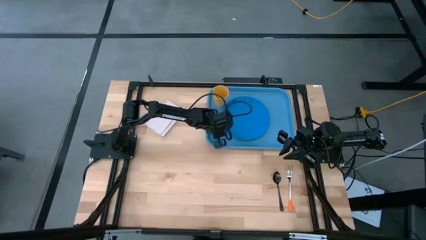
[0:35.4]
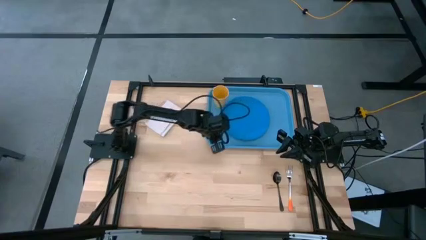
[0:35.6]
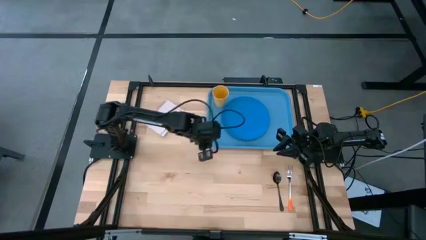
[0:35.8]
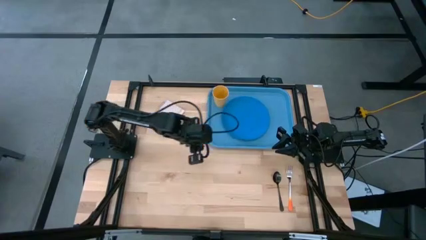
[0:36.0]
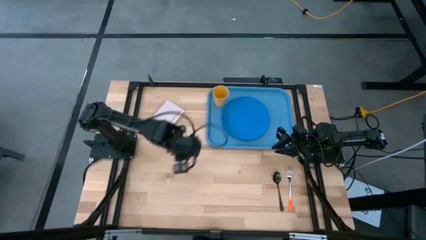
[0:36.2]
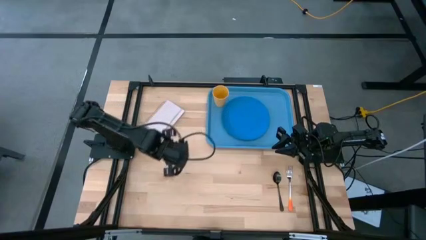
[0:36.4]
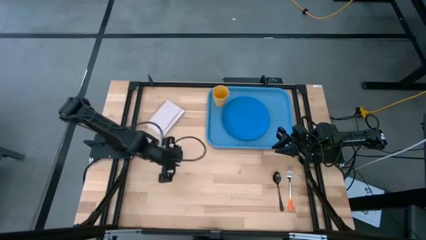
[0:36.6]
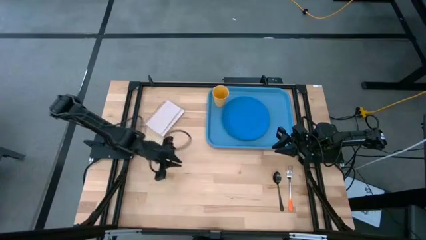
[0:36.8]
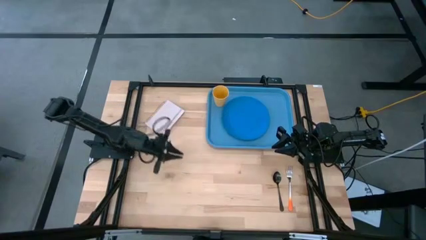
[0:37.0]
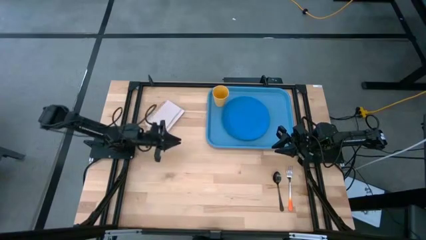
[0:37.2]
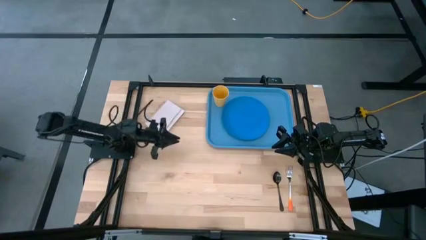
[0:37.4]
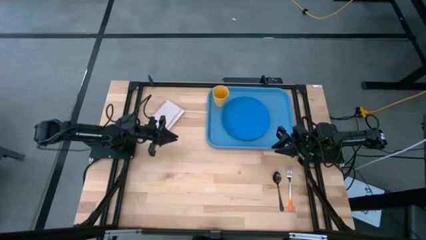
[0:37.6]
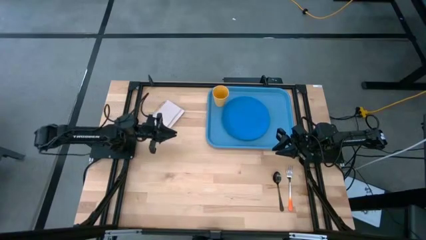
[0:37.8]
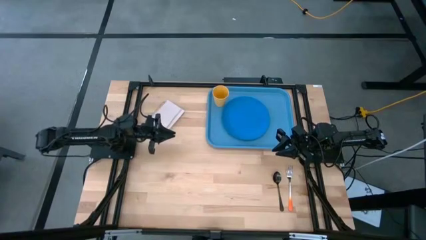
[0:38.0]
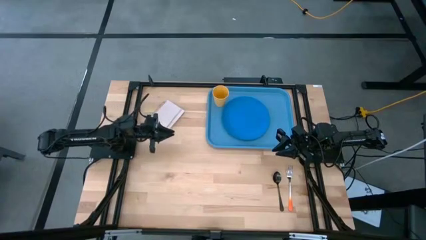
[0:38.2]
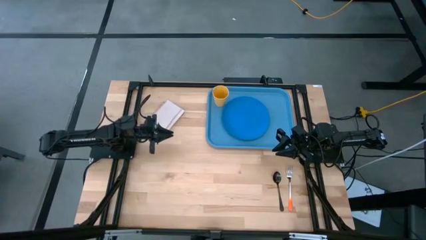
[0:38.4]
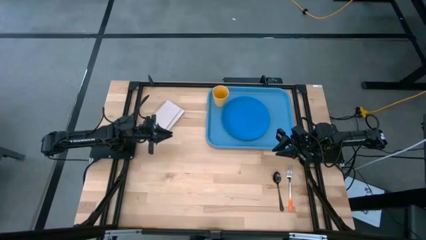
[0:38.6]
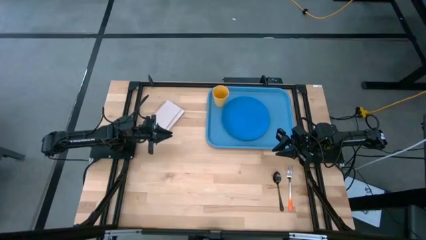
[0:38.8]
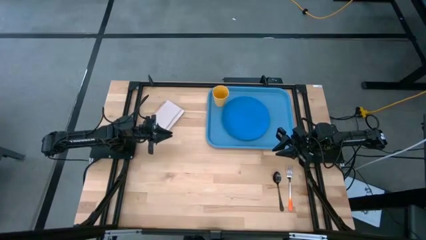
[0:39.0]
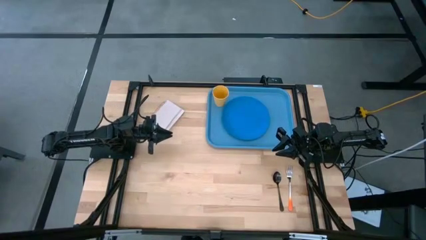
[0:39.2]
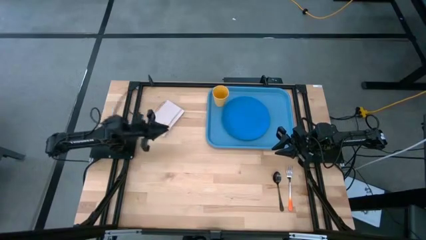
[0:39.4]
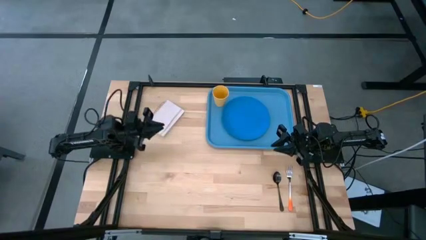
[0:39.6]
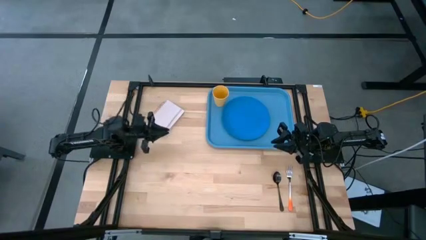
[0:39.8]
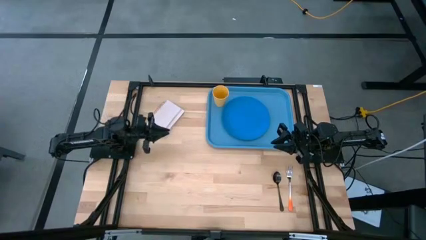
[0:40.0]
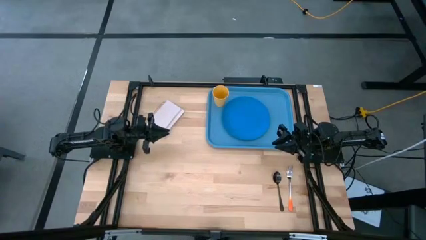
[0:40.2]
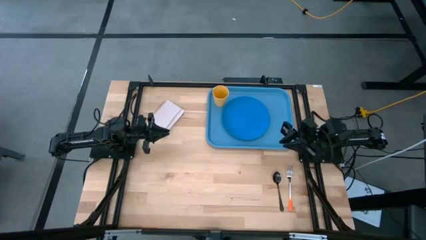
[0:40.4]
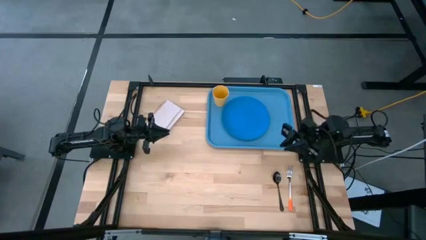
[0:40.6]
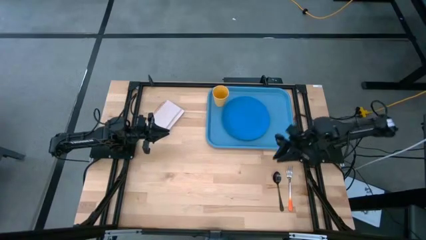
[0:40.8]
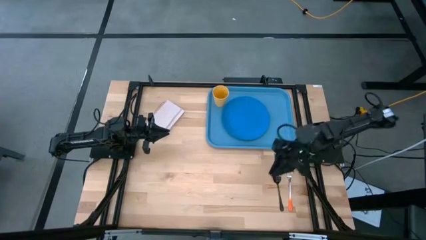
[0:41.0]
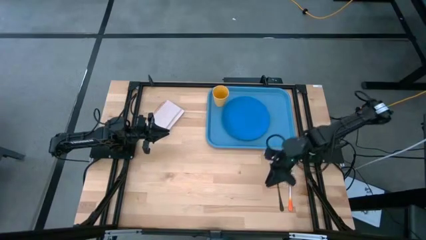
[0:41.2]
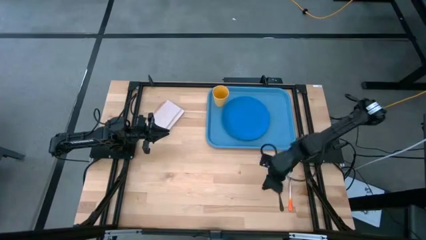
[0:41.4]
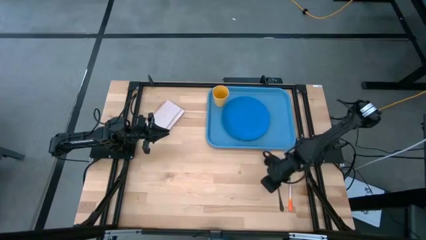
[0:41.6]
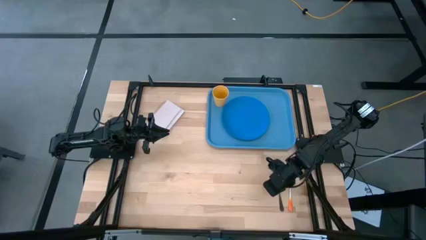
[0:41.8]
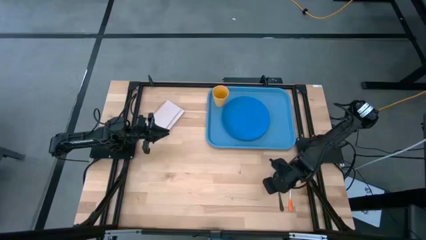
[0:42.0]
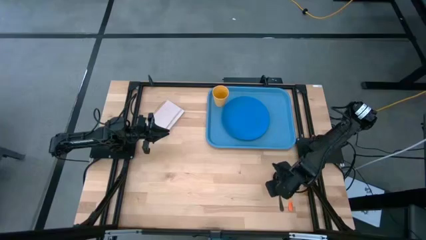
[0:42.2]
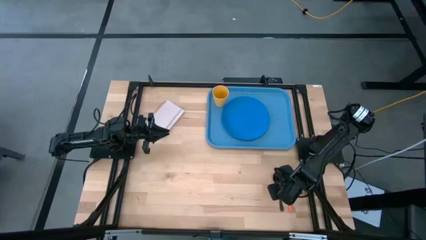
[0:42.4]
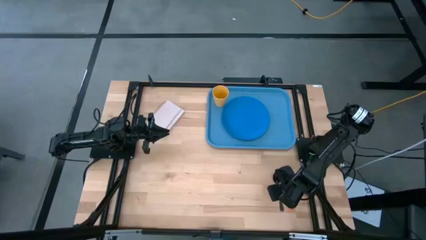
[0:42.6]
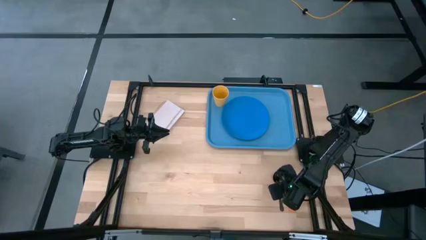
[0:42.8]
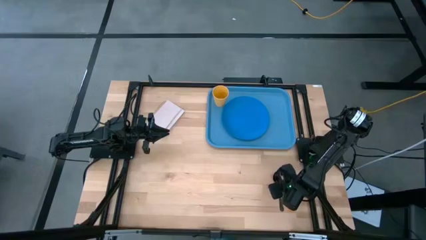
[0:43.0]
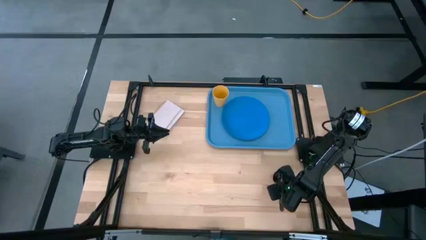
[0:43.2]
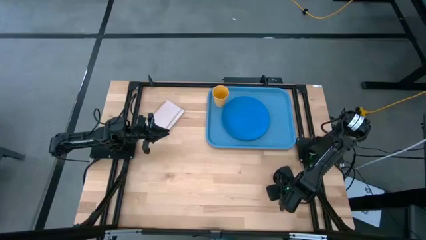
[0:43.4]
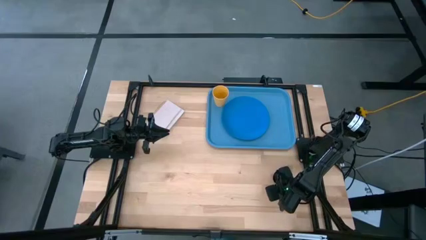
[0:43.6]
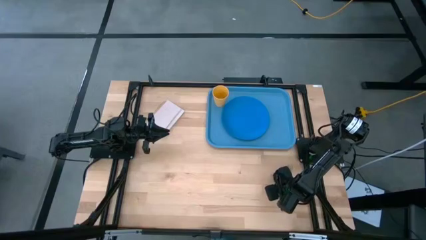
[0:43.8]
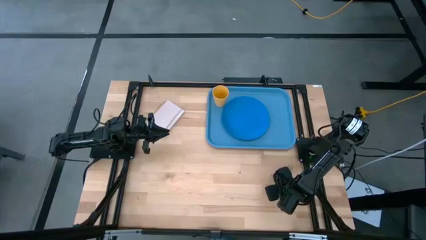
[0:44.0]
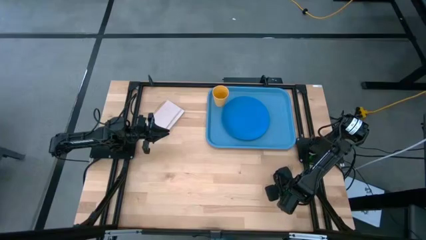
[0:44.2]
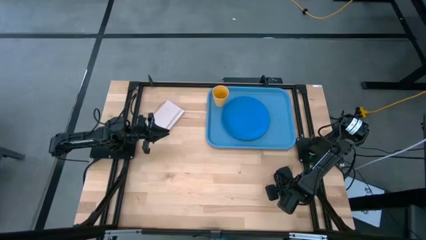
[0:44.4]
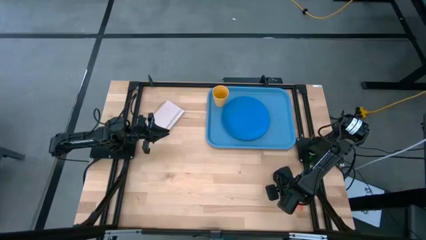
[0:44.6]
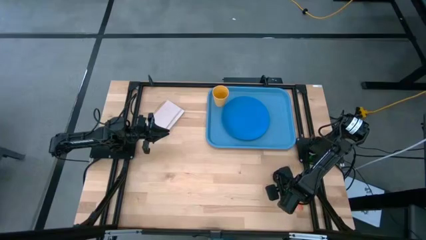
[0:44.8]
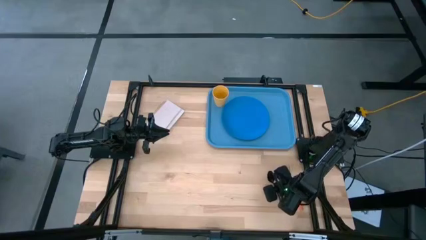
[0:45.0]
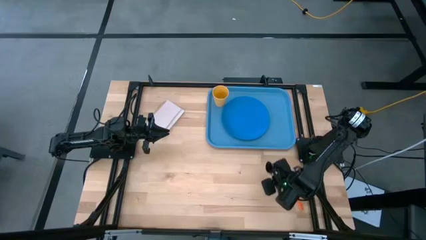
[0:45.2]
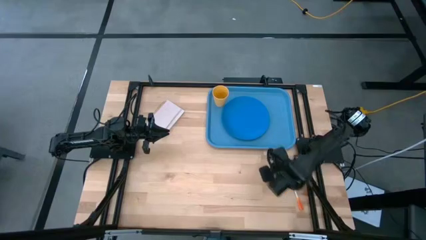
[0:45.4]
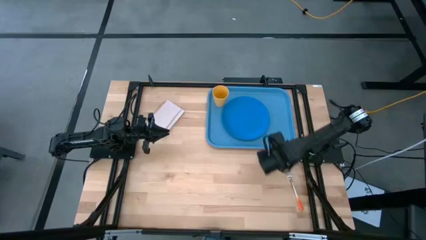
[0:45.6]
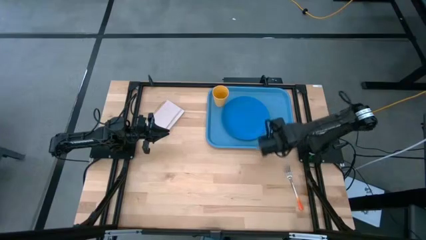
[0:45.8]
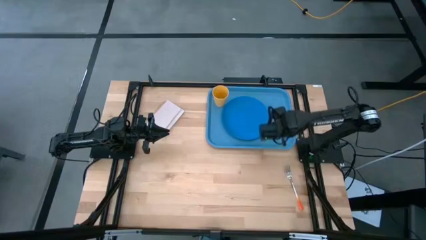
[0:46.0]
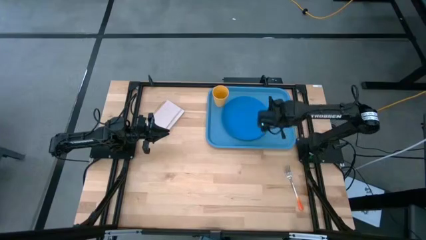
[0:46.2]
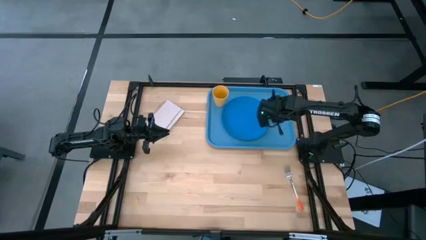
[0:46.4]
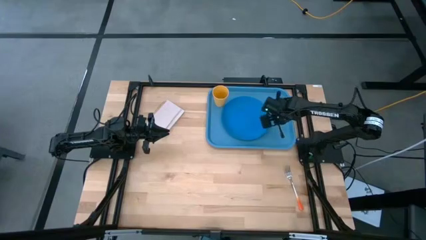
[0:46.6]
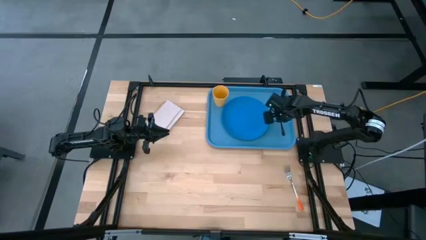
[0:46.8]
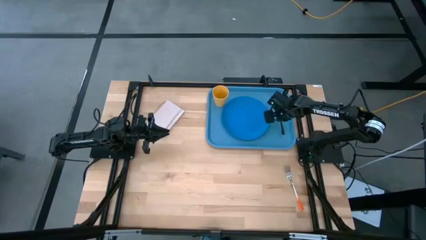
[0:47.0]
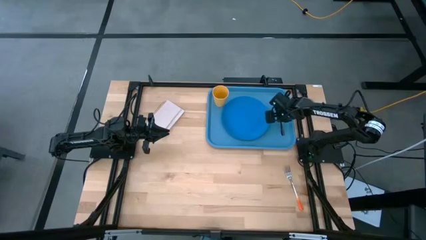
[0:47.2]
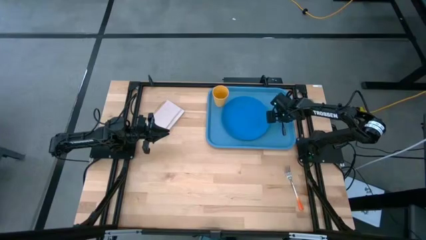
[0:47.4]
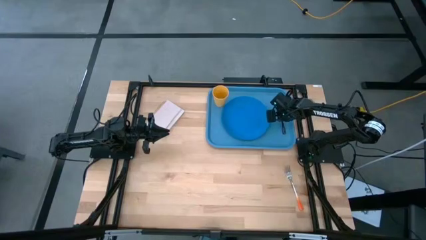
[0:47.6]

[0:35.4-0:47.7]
Task: Pick and place plate/cup/fork/spoon on tray
Put the black spoon on the tray to the right of the blue plate
